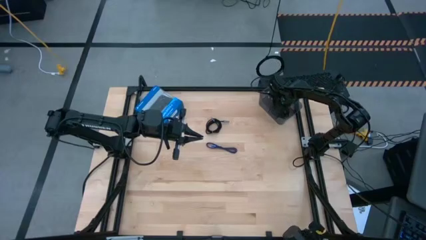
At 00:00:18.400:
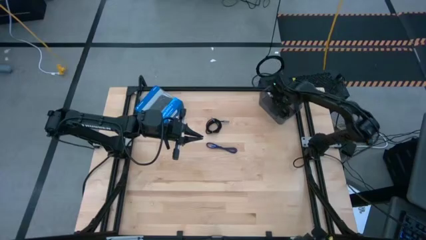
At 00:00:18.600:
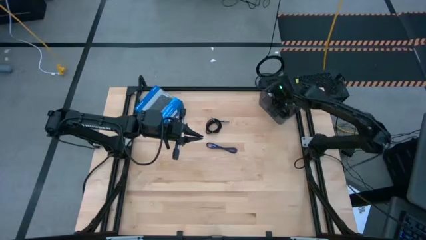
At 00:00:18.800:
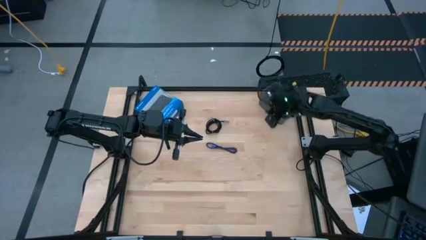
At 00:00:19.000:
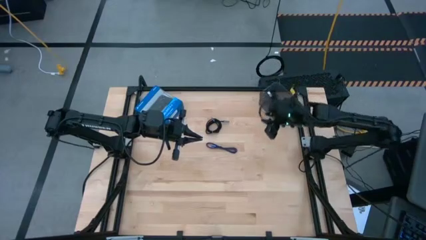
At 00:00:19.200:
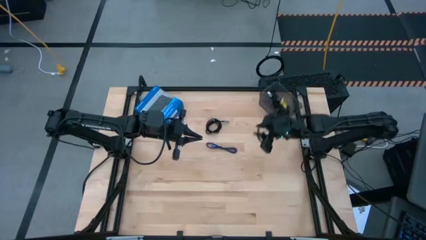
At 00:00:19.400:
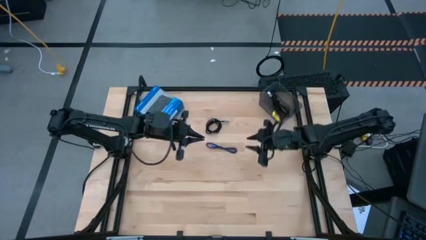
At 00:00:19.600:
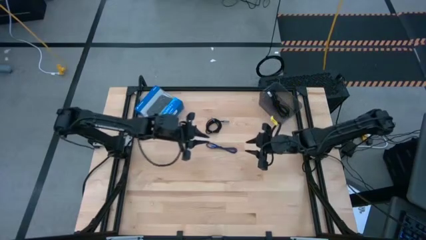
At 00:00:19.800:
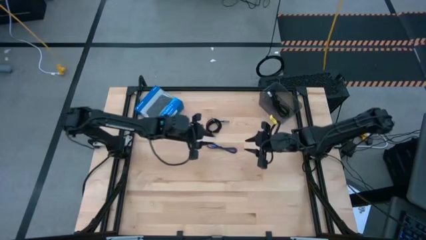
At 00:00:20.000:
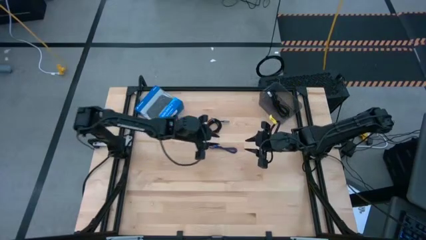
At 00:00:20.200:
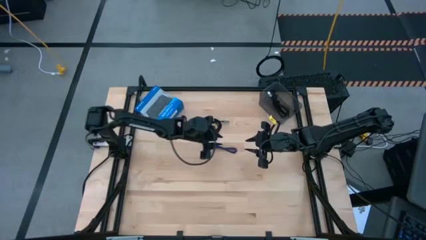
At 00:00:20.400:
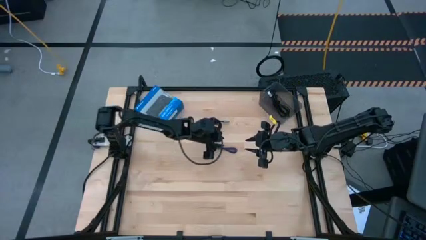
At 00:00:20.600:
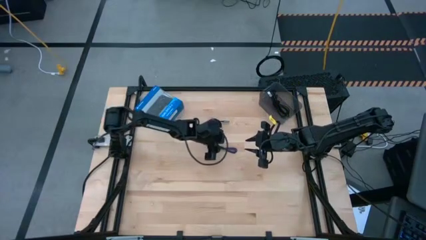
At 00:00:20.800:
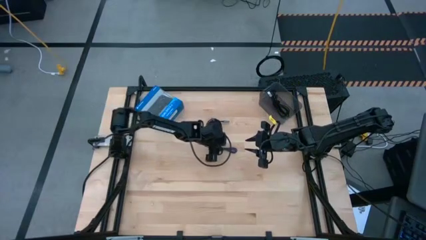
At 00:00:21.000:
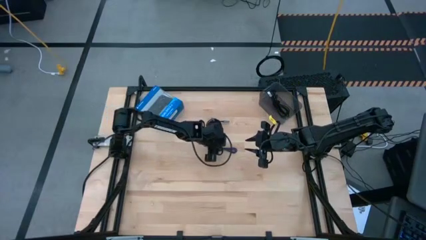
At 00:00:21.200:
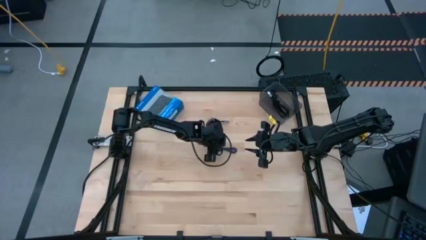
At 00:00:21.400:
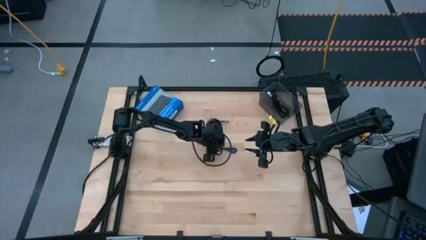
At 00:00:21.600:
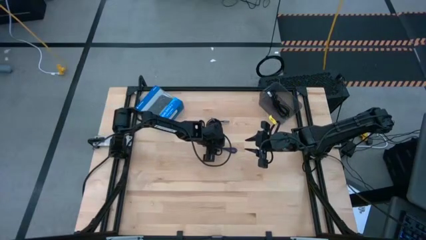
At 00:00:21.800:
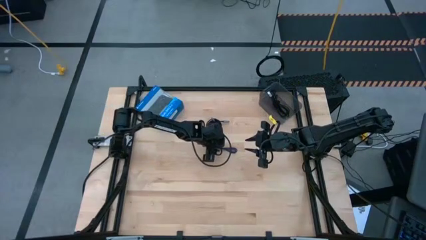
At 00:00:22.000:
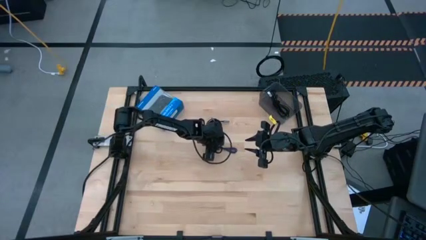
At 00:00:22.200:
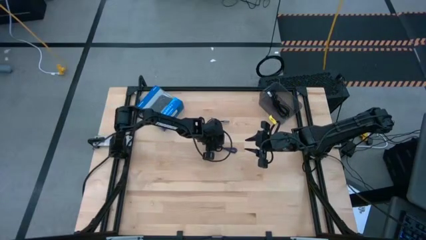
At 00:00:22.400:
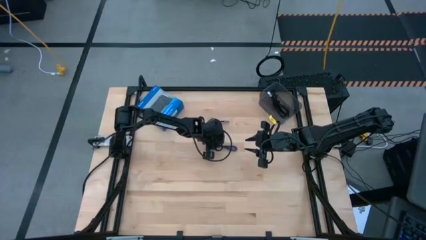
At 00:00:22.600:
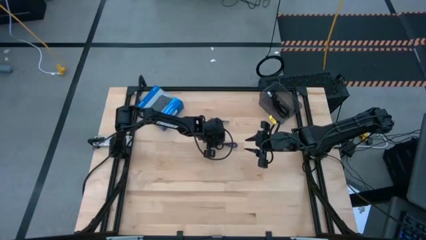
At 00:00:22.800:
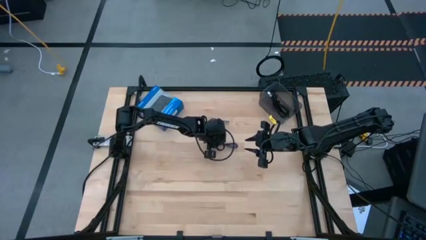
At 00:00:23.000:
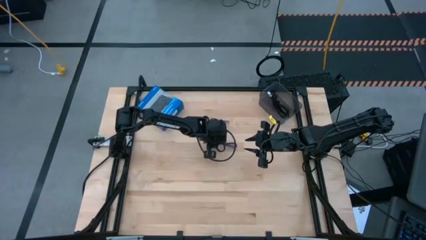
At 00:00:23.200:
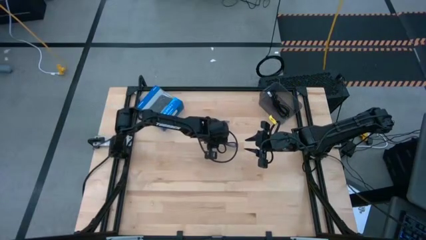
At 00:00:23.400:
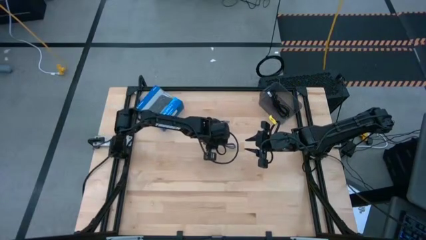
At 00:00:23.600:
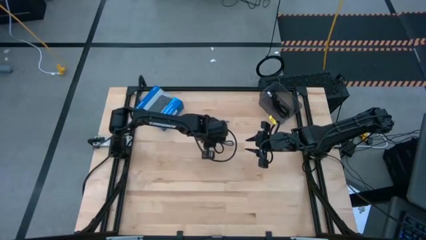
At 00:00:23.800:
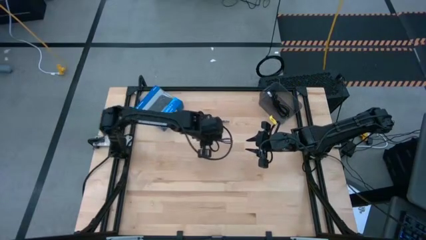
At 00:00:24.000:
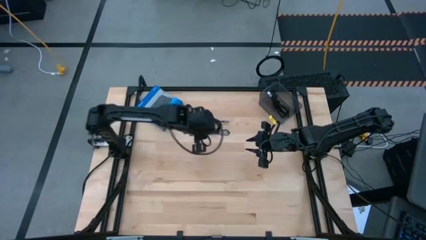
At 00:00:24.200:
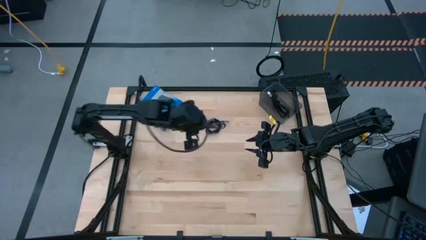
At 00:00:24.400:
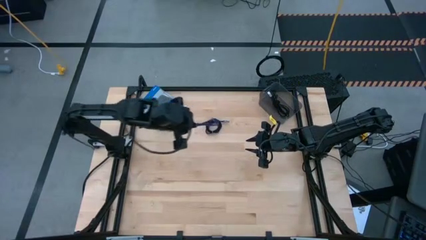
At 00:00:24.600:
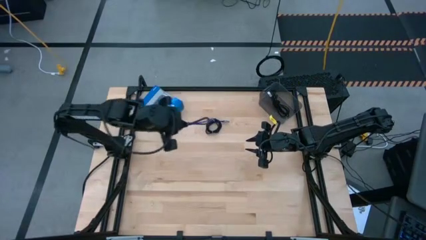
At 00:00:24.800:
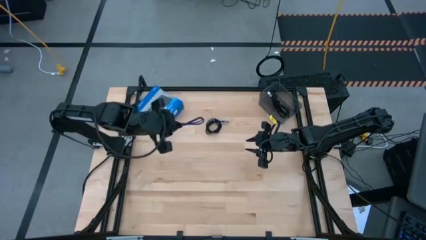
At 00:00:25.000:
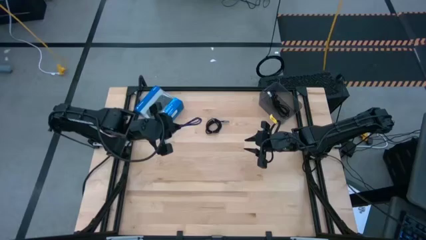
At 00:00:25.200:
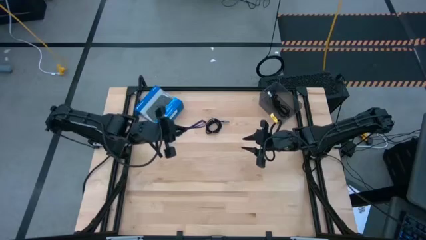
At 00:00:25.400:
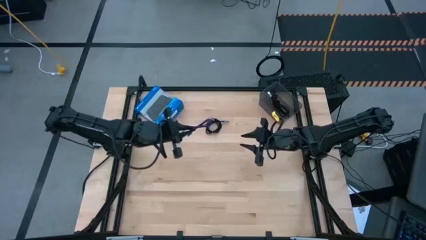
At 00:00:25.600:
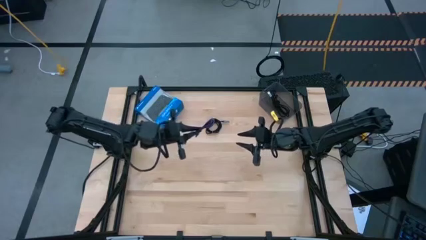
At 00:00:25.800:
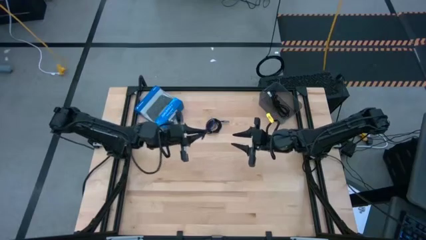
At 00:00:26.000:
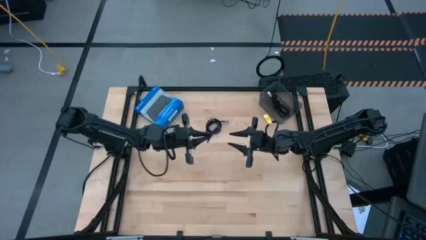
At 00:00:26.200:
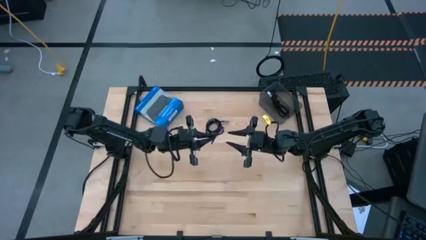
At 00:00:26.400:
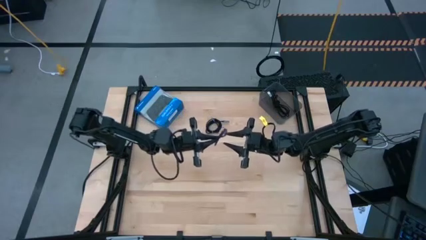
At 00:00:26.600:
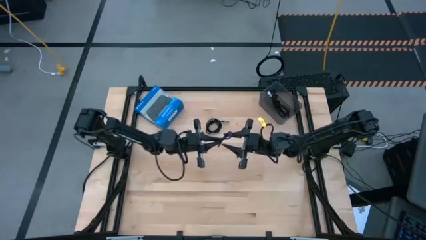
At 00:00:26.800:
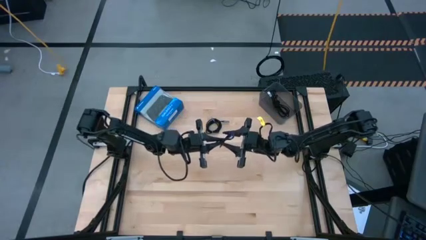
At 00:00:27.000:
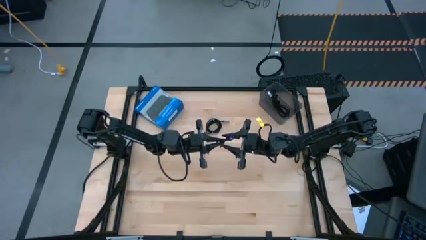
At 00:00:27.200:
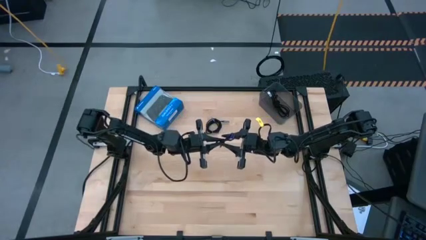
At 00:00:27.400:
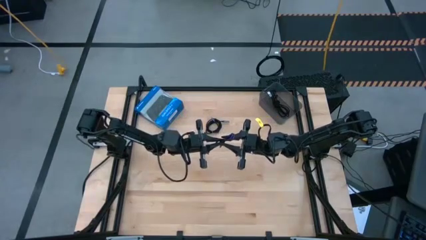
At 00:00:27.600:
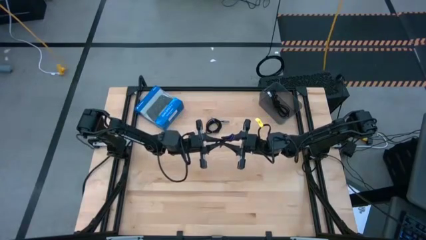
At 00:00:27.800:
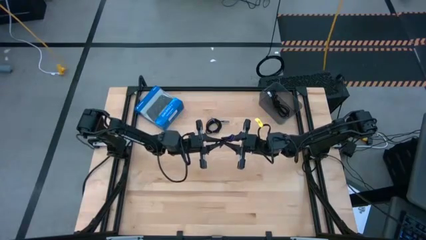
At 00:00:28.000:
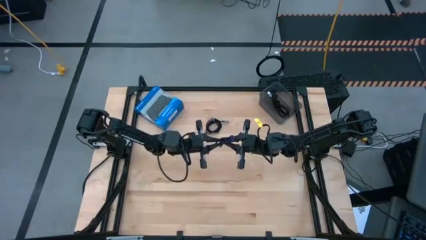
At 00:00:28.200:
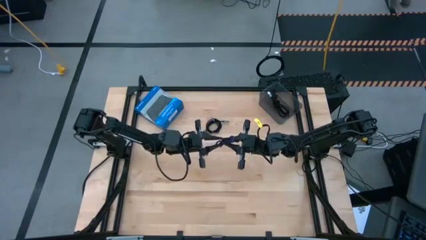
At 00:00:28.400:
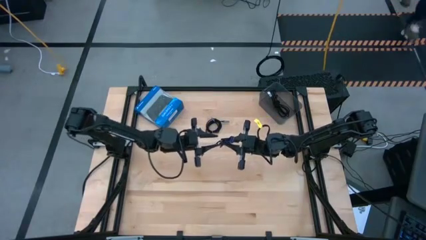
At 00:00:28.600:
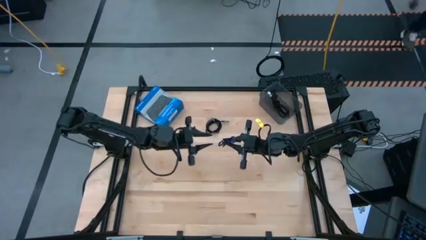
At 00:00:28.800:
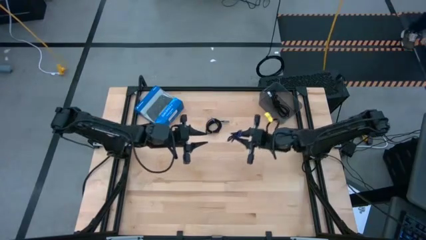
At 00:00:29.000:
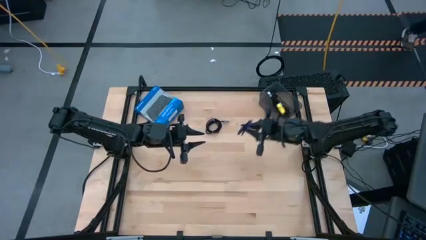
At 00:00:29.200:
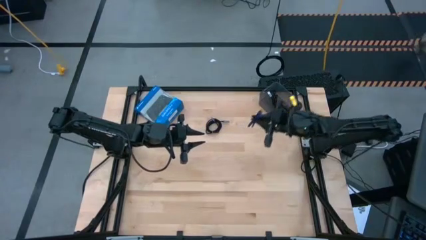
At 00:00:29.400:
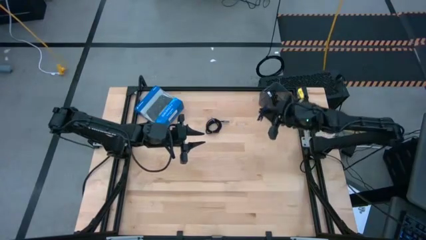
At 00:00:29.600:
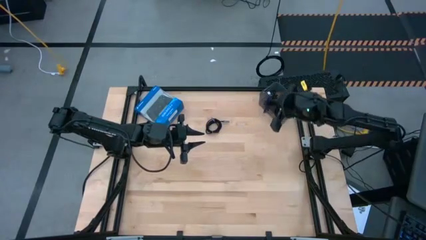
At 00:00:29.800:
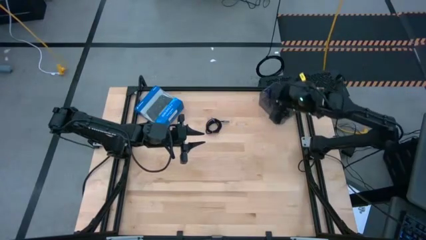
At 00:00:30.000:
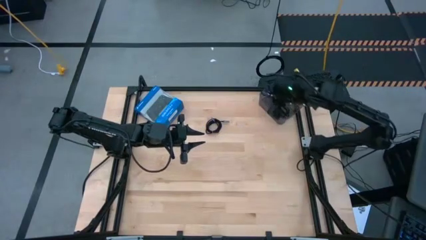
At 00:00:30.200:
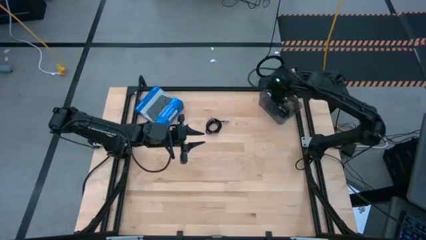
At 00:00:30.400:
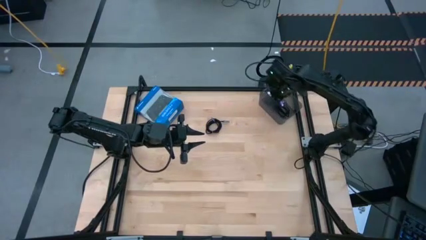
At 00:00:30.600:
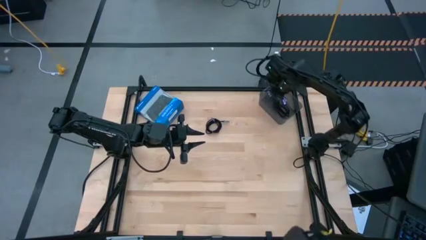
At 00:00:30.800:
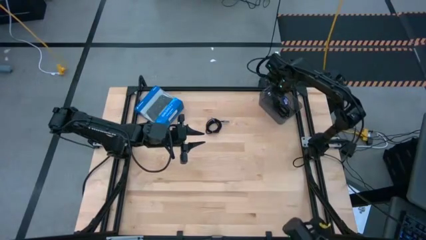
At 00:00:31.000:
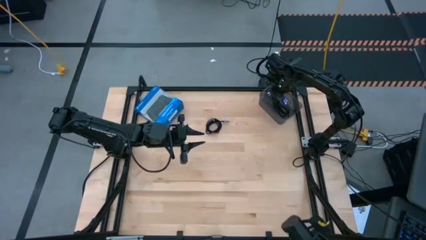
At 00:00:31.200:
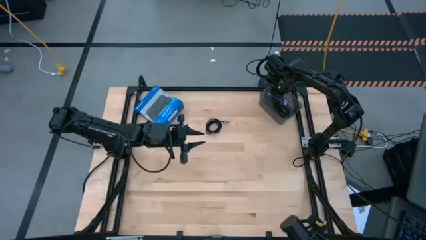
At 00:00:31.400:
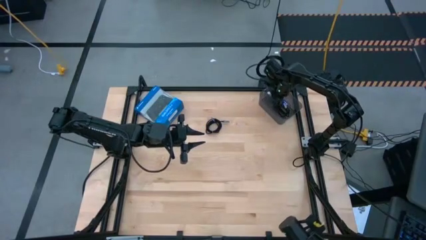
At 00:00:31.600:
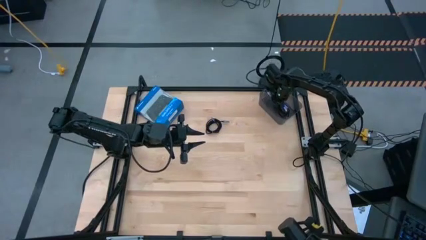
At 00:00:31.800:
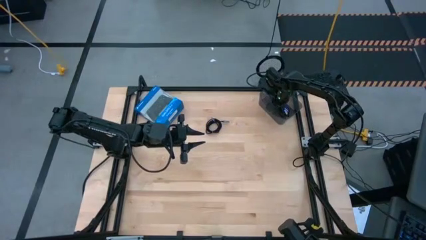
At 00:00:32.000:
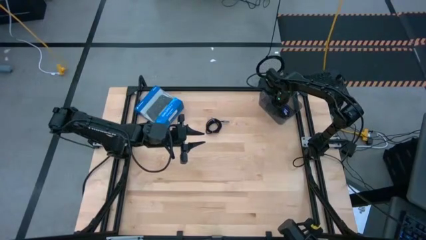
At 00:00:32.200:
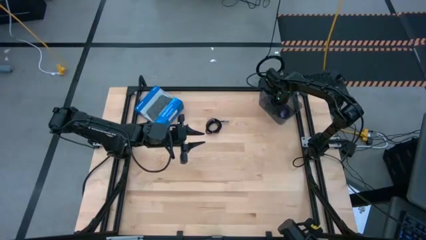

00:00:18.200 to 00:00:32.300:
Task: Pick and place USB-C Cables
Put the blue charger cable into the bin
